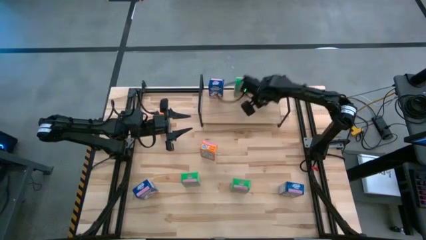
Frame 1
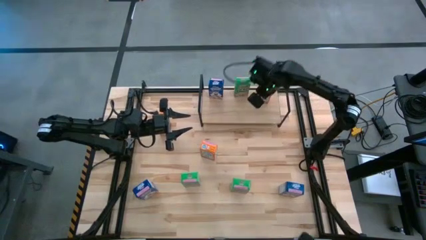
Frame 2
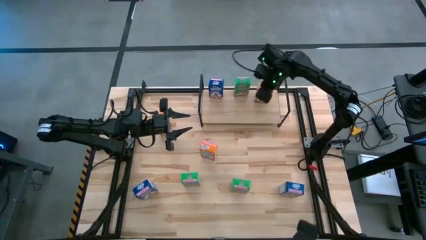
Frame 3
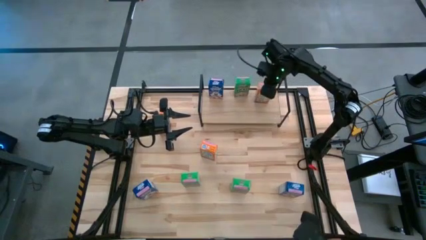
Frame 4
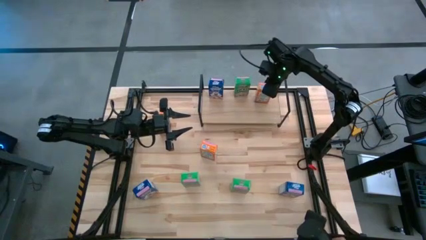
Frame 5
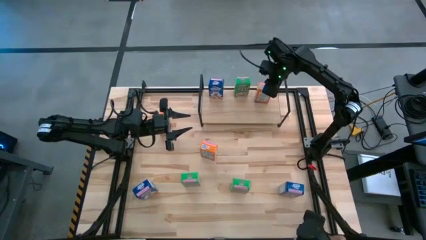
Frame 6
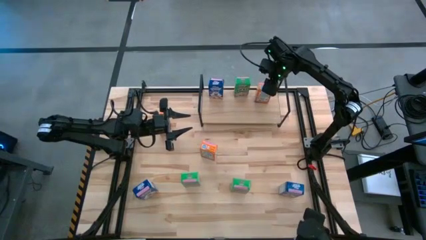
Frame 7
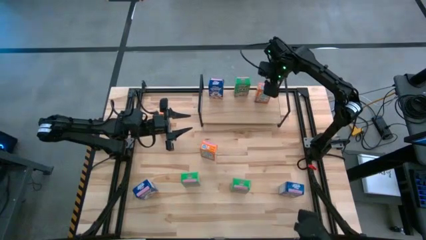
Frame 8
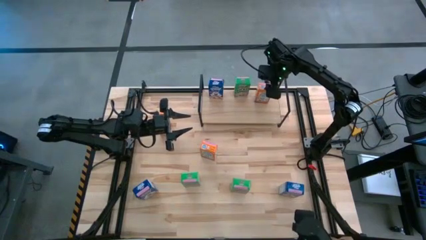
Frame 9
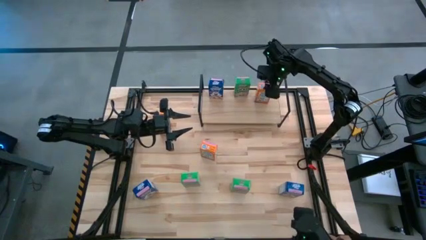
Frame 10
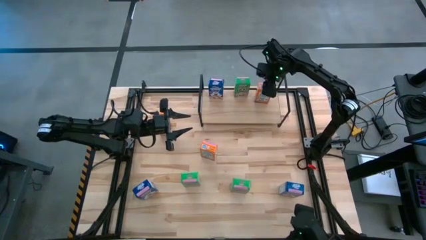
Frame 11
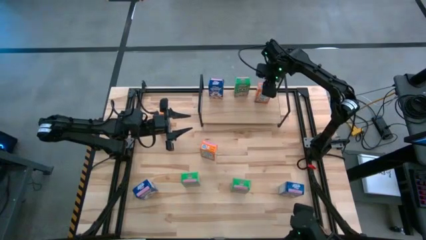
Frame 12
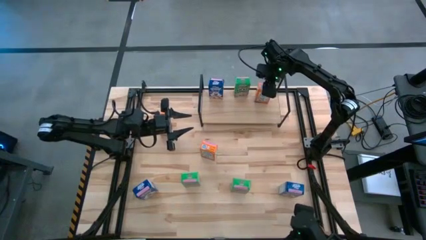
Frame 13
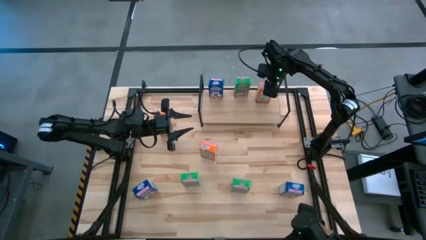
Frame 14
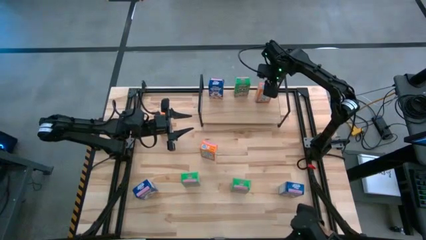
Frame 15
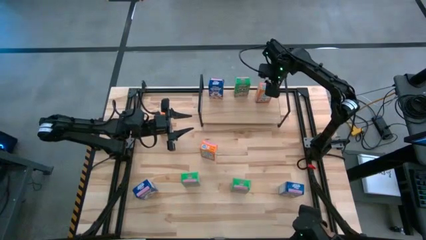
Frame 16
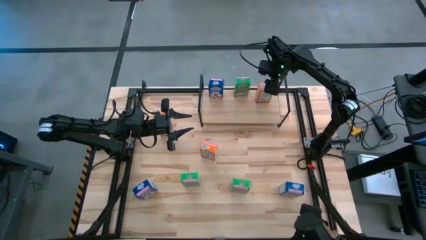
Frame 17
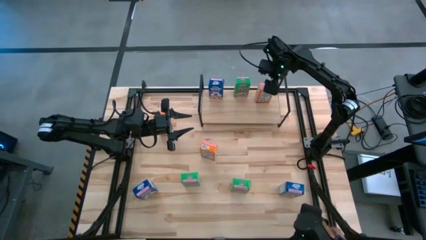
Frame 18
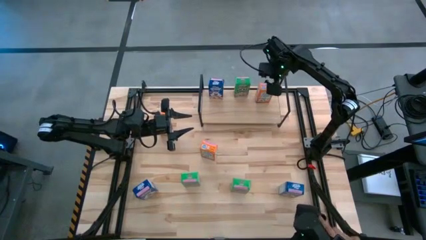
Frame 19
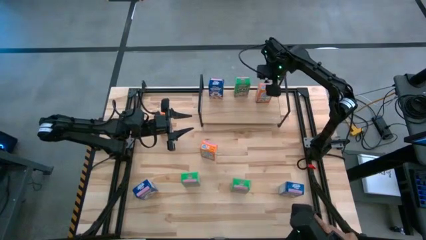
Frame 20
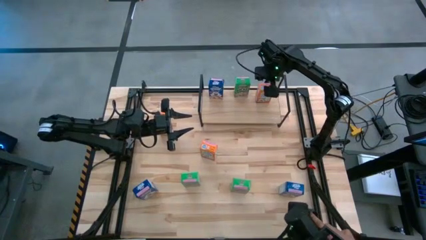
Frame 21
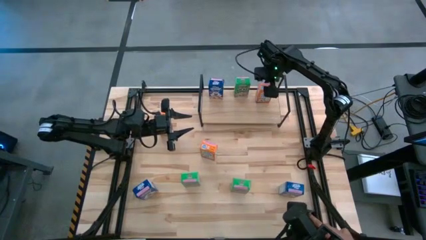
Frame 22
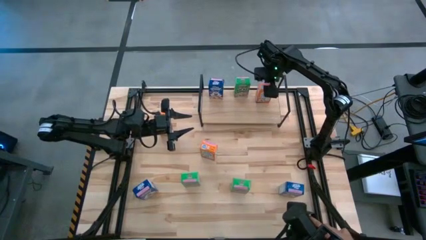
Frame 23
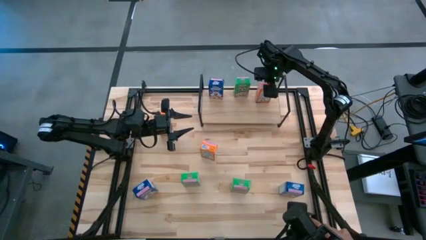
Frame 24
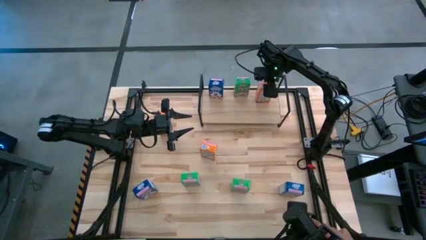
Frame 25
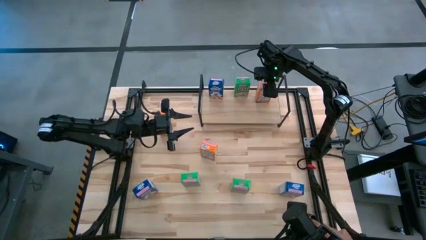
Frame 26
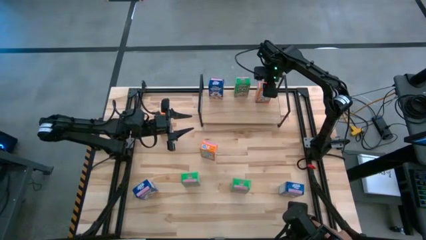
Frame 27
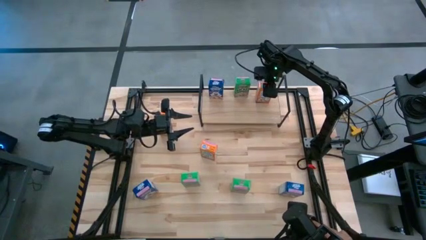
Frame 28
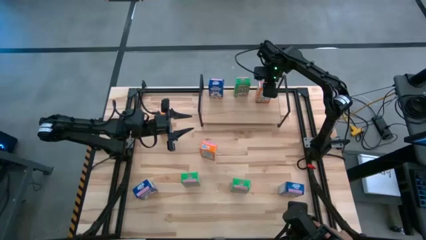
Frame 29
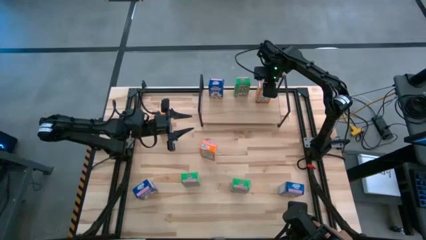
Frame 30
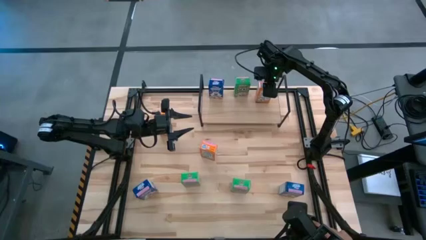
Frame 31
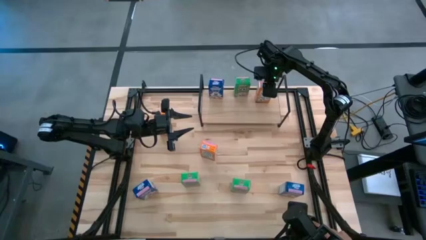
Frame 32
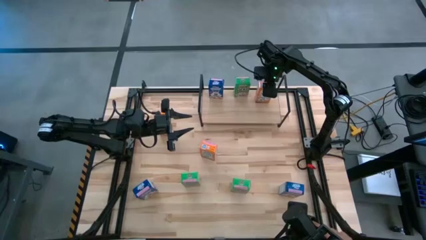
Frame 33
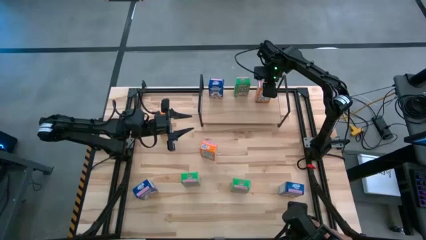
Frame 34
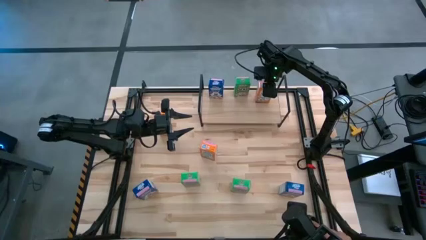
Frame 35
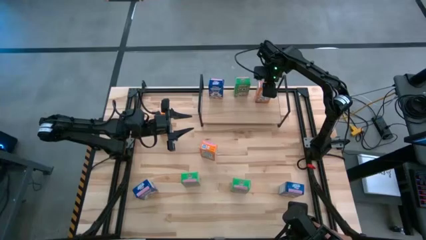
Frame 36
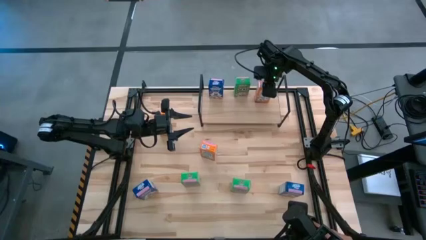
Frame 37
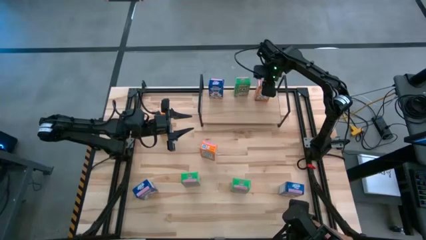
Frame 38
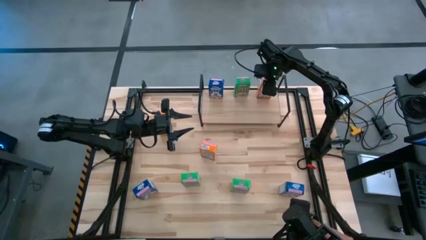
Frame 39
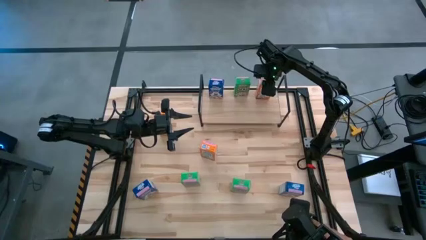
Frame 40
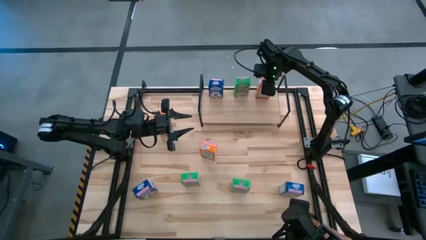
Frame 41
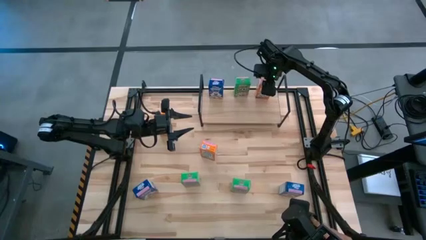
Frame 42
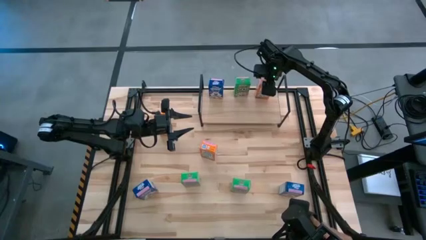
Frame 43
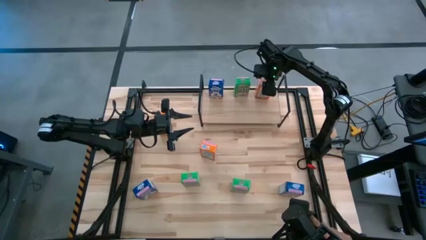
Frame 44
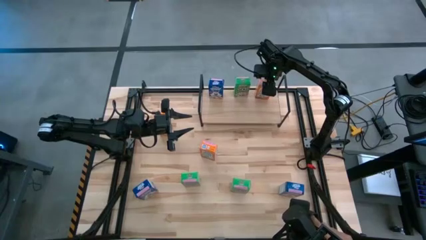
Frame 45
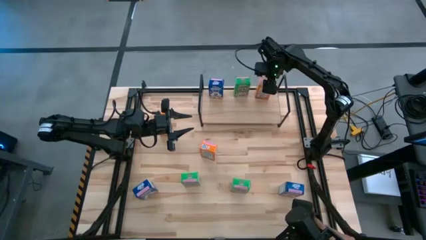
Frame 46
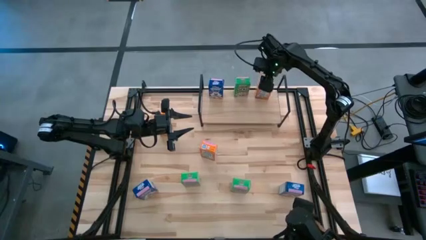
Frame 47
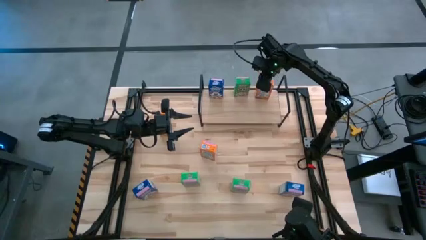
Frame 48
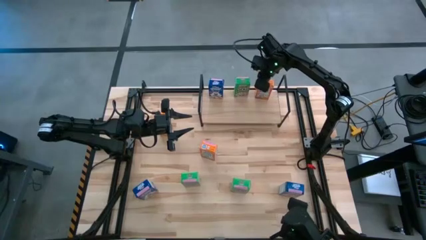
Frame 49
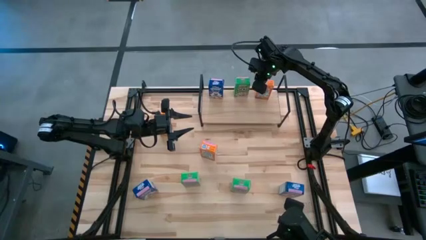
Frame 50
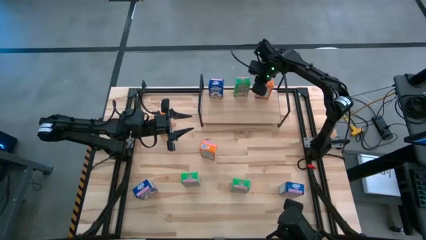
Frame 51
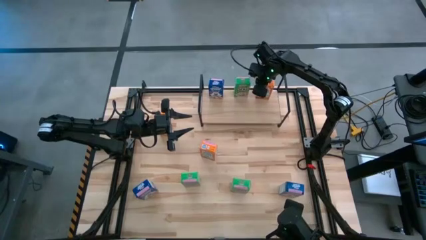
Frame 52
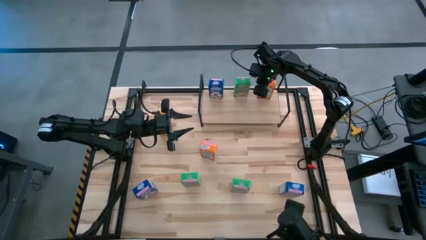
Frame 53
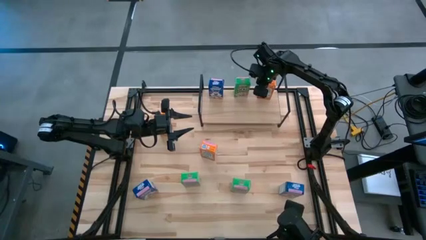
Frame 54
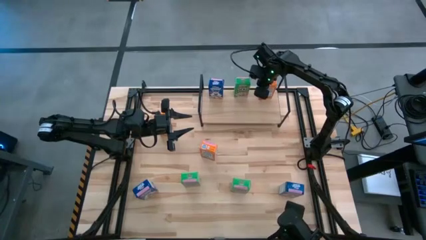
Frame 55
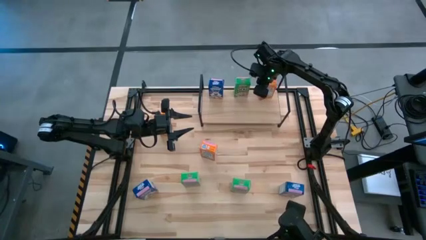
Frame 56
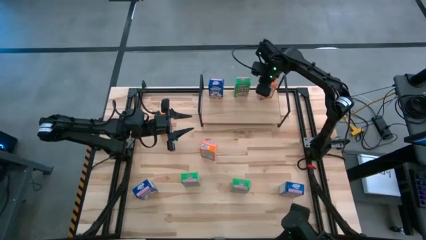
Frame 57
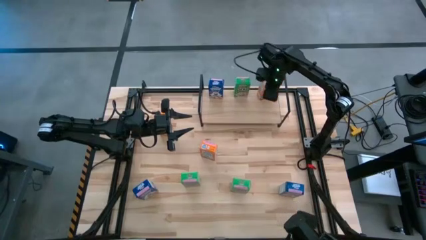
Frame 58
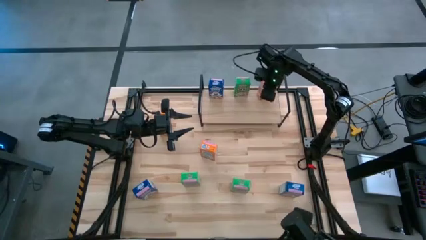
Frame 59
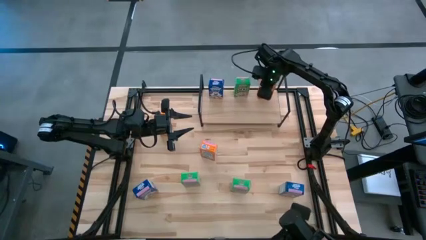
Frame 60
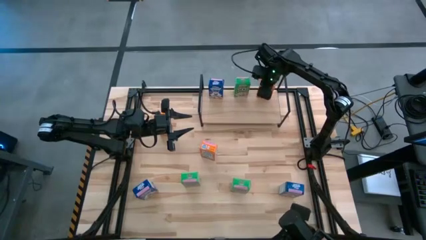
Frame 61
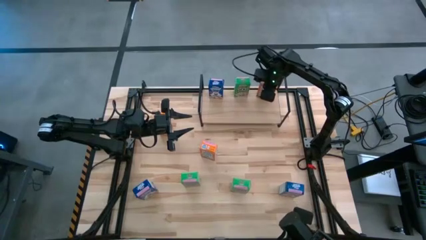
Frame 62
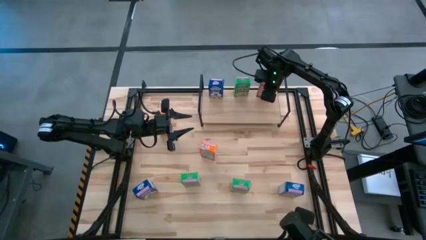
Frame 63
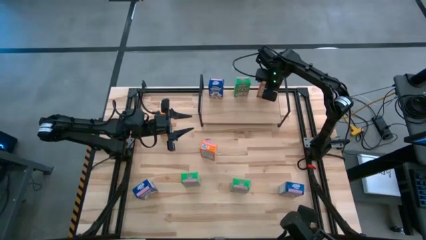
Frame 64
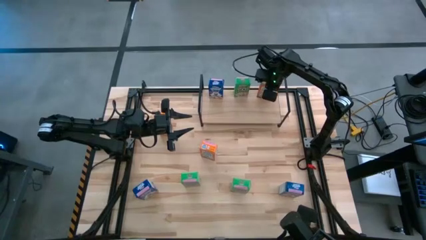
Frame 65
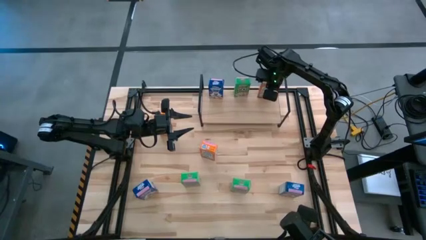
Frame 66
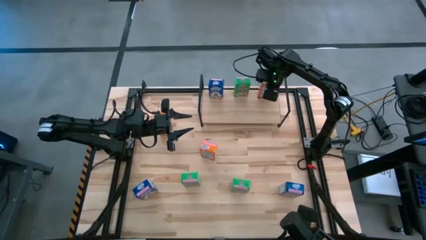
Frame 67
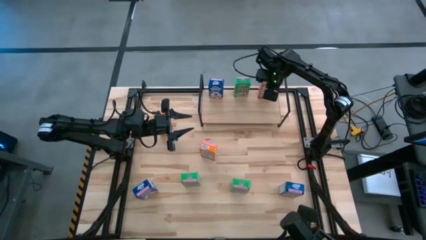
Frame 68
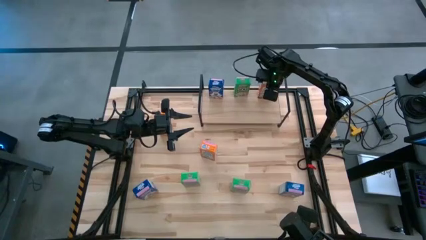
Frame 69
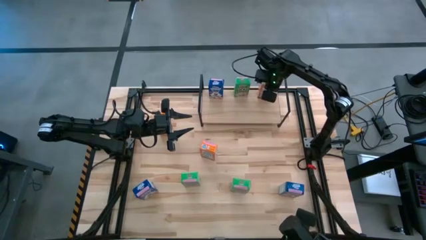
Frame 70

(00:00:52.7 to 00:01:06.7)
Task: Stack cereal on shelf
Put the bottom right orange cereal box on the shelf

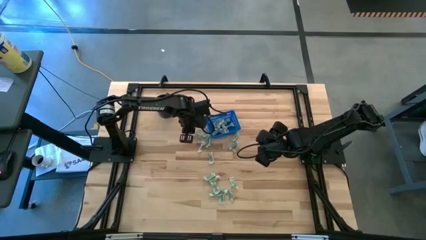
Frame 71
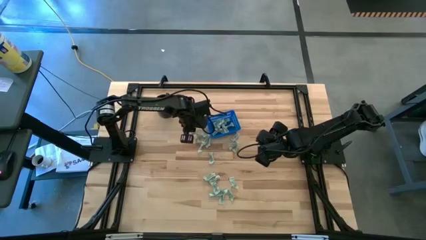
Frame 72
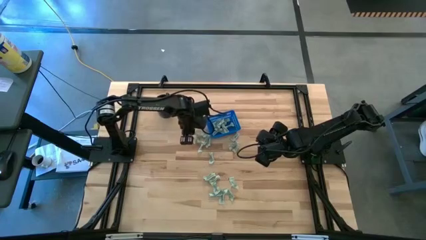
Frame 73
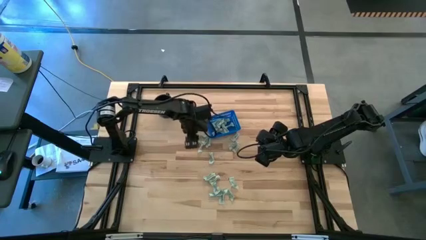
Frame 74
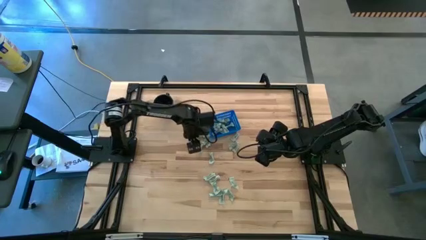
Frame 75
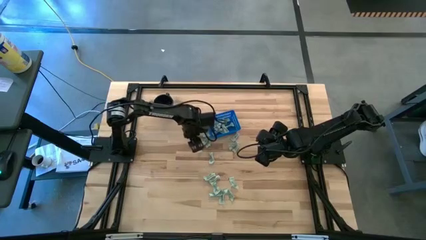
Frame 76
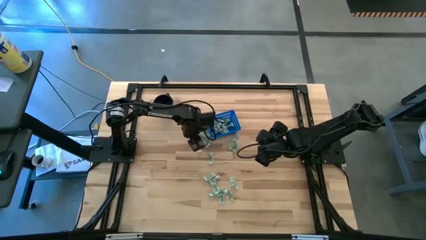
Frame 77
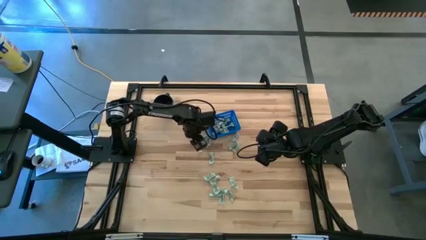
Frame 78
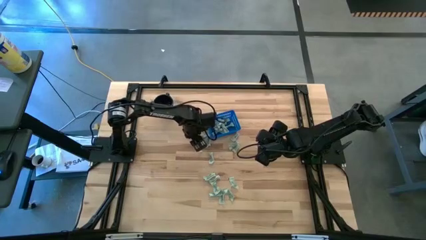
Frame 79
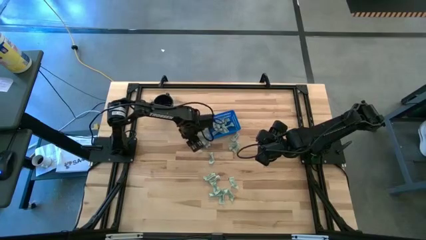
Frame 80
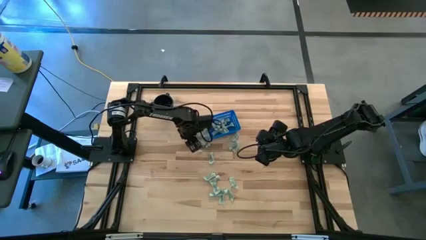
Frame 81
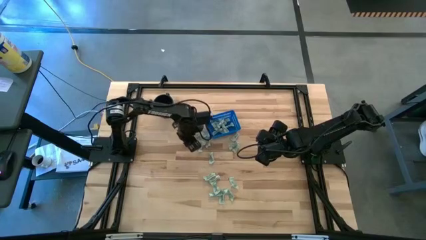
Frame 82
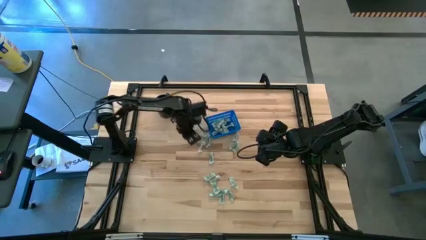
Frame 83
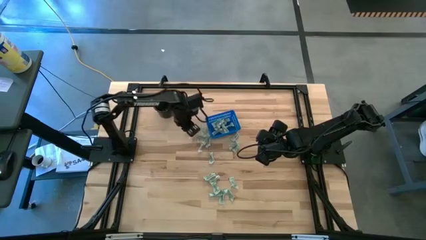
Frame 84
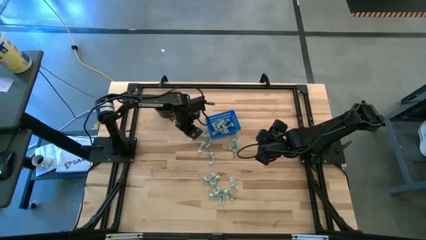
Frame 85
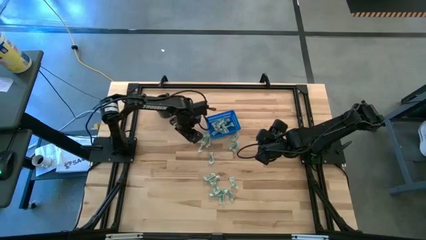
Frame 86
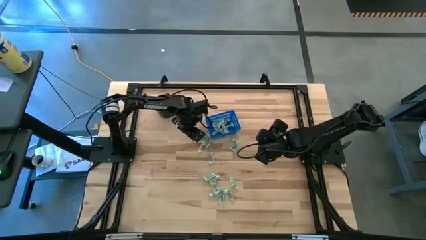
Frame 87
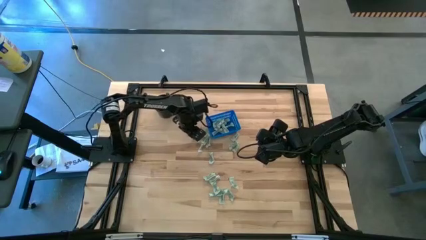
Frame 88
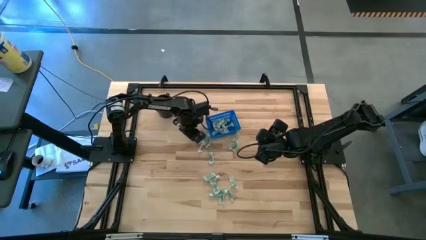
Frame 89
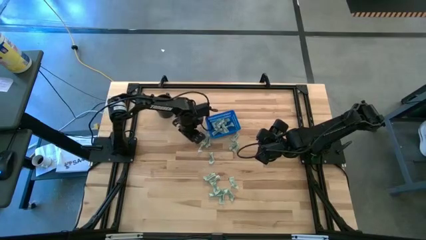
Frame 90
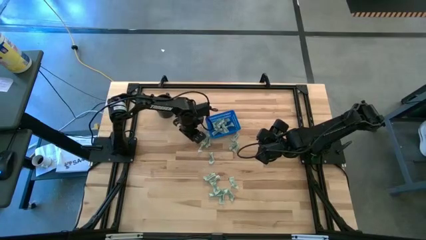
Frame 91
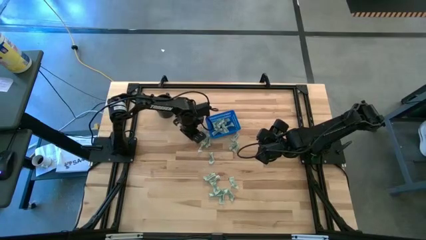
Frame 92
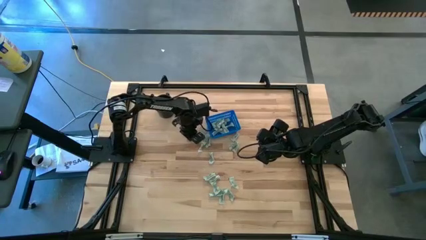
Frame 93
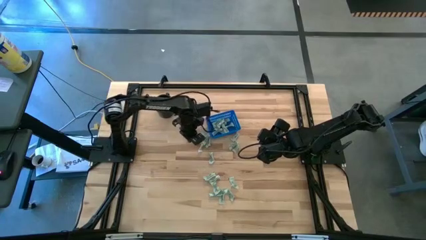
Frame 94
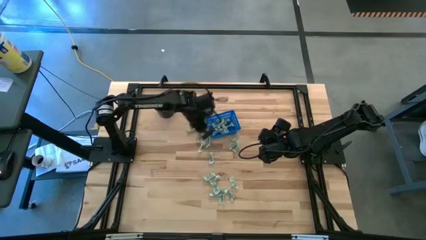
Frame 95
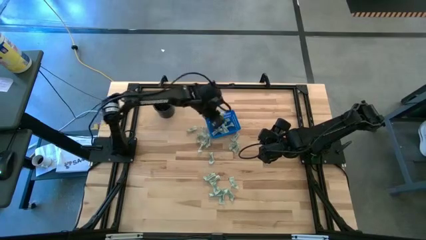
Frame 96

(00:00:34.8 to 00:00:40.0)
Task: Pick and place Stevia / Truvia into bins
Put the green stevia packet into the blue bin
